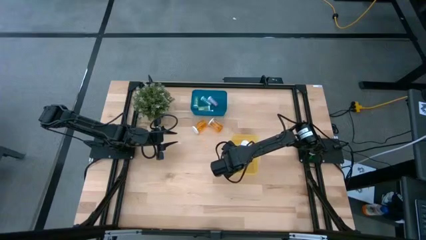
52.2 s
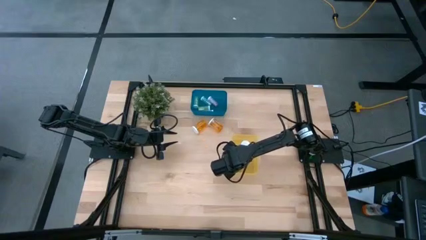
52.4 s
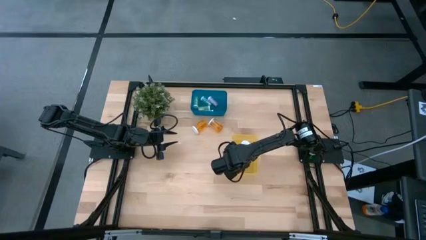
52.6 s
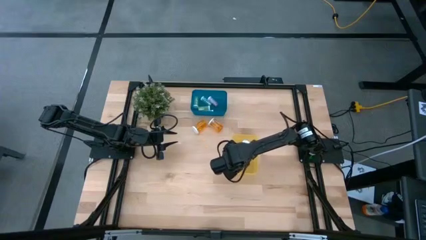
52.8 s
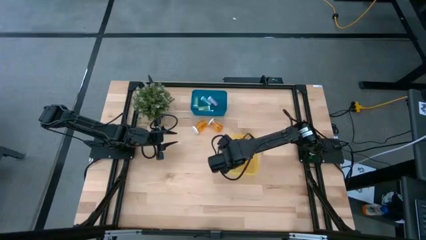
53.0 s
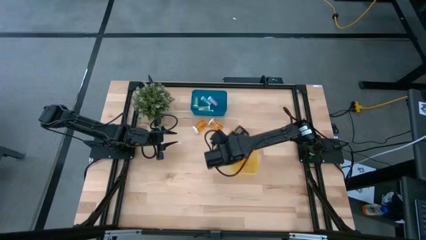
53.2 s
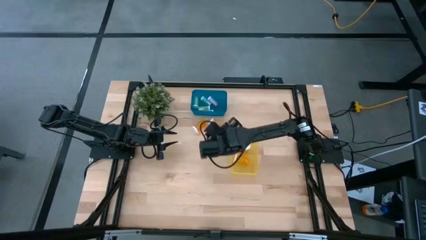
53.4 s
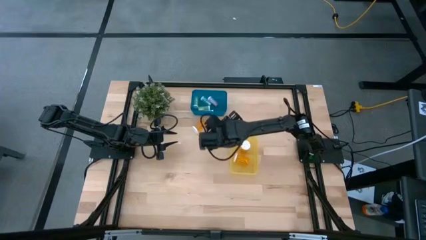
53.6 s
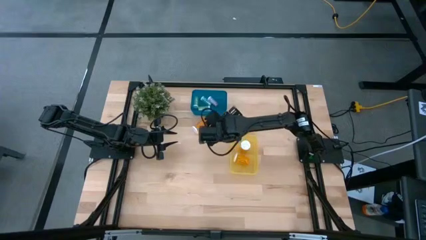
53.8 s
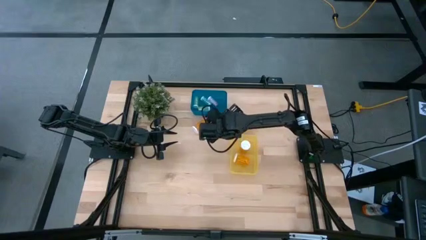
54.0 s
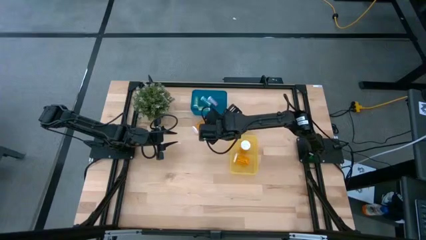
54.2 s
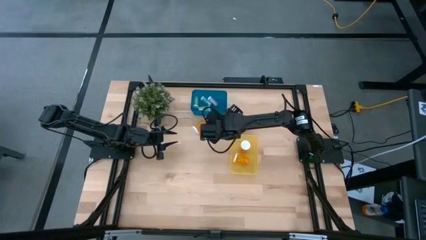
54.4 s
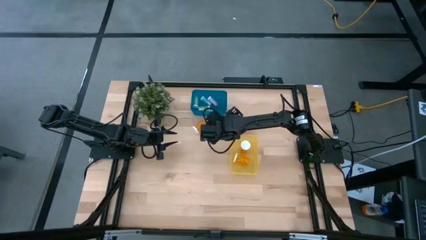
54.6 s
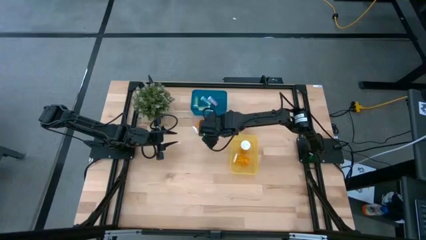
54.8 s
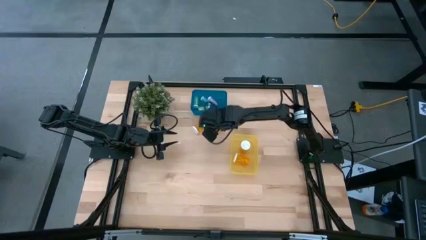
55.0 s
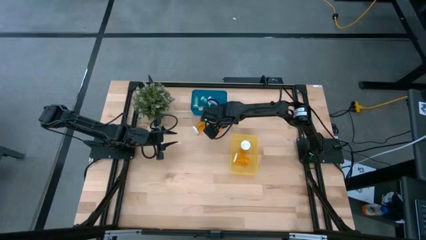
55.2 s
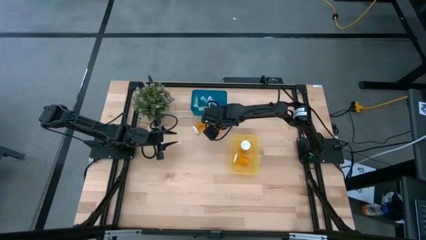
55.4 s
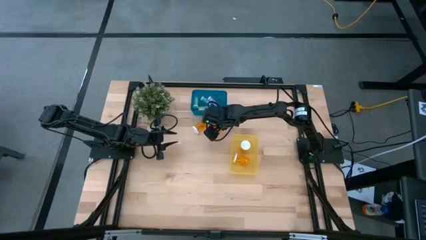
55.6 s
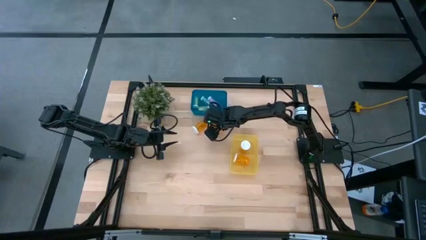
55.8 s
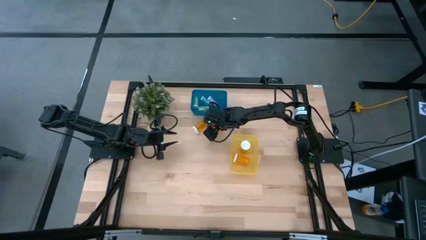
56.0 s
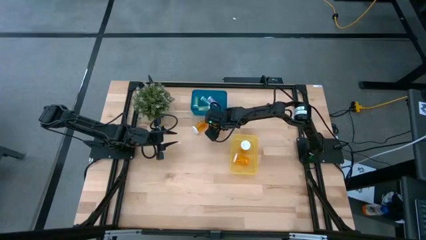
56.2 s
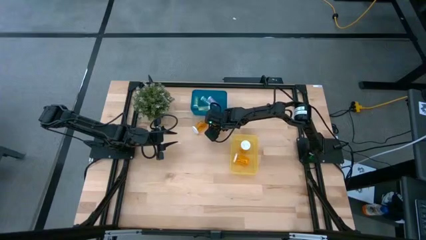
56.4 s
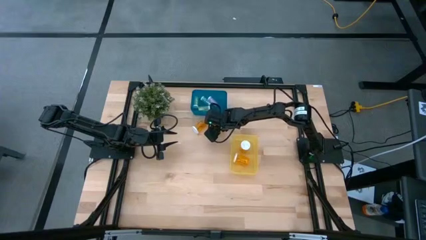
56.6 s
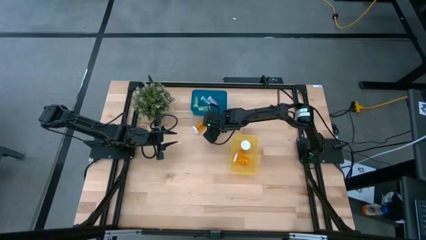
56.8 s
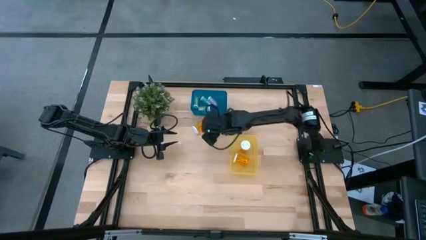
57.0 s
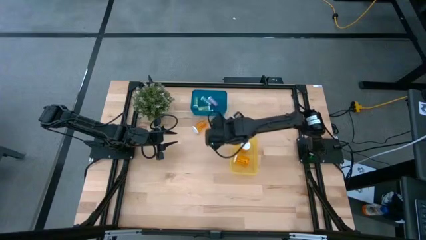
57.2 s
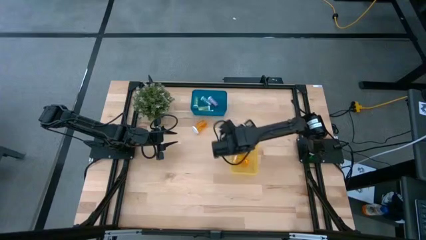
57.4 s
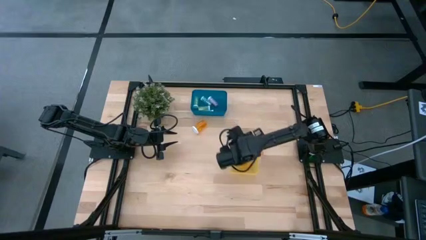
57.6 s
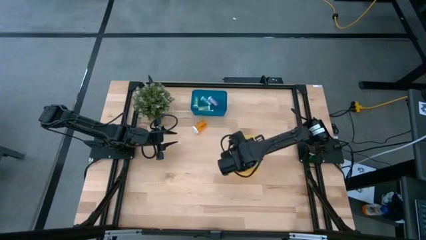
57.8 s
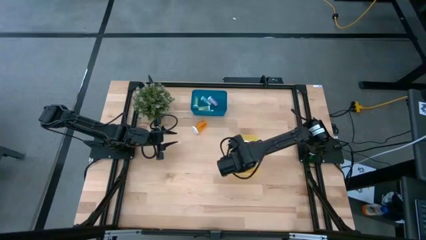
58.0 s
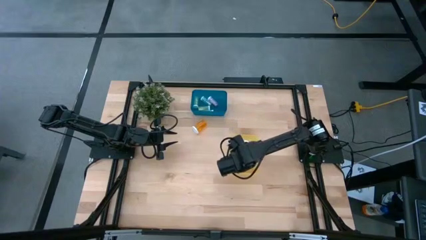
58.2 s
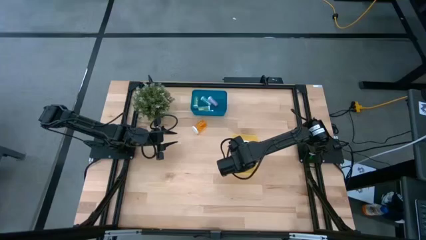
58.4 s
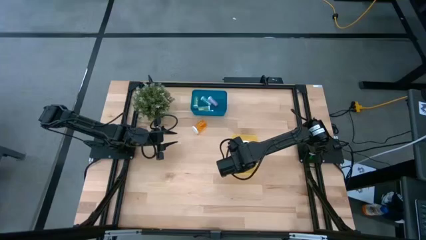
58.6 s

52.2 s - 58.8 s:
Task: Pick and place medicine bottles into bin by pill shape (circle, oval)
Put the right big orange pill bottle into the yellow bin

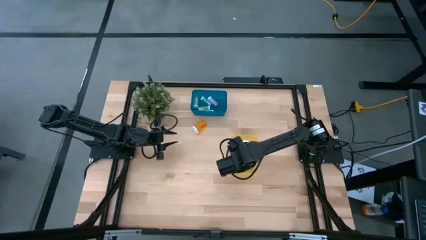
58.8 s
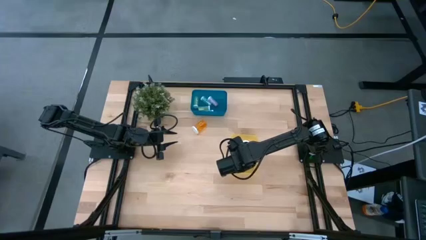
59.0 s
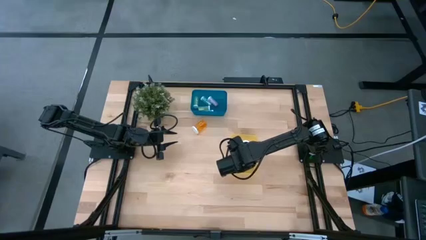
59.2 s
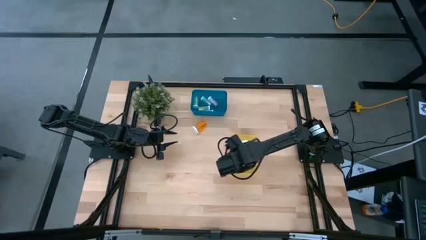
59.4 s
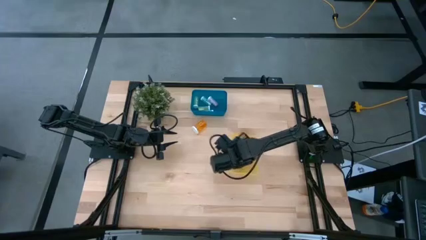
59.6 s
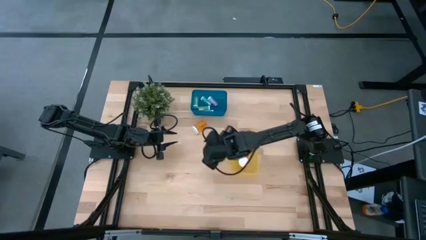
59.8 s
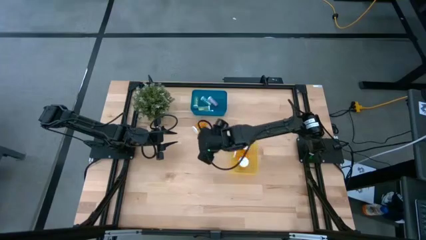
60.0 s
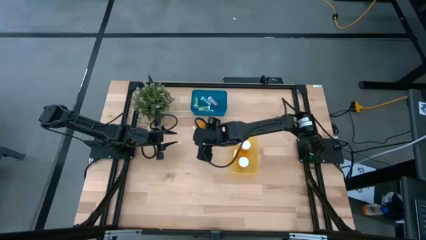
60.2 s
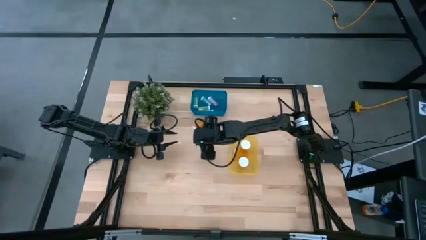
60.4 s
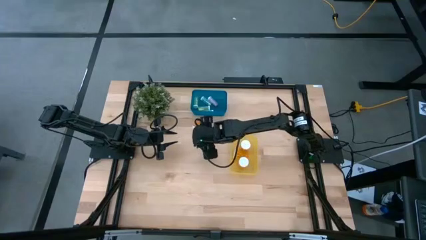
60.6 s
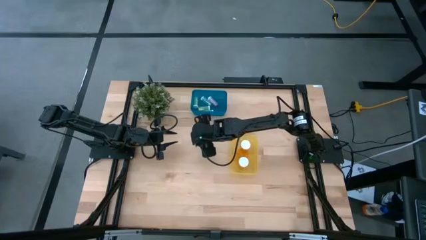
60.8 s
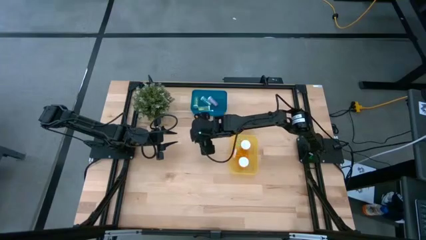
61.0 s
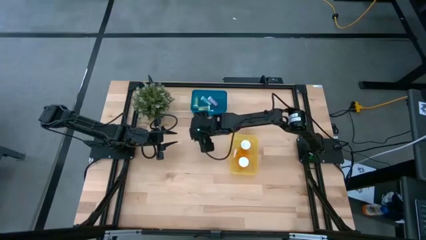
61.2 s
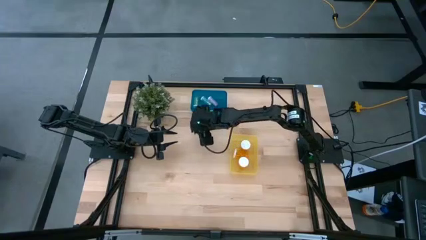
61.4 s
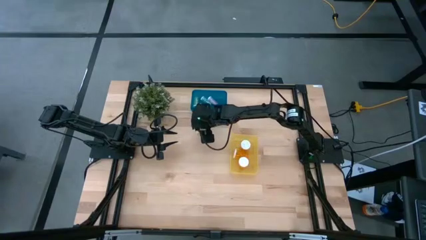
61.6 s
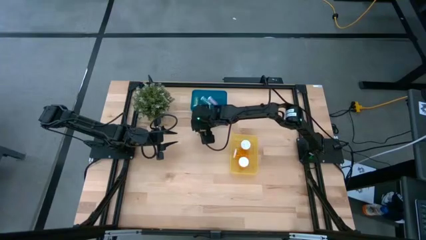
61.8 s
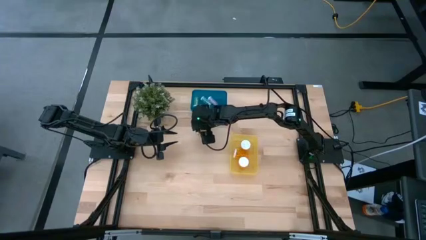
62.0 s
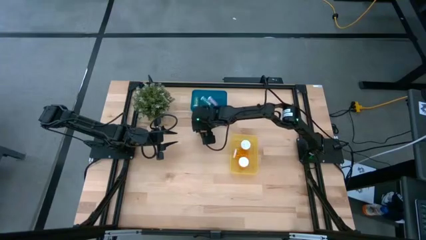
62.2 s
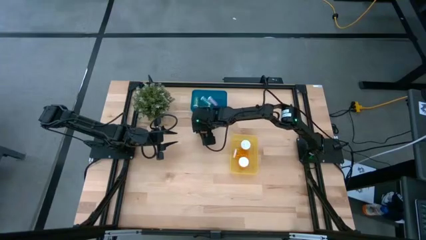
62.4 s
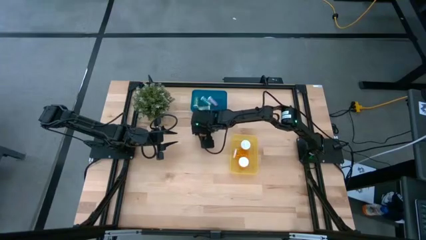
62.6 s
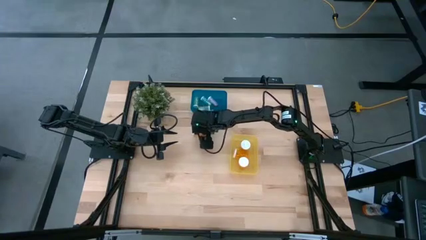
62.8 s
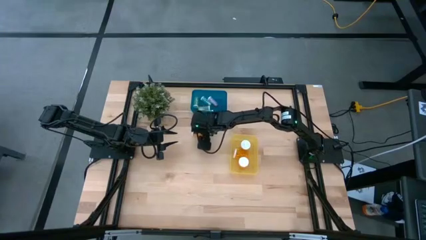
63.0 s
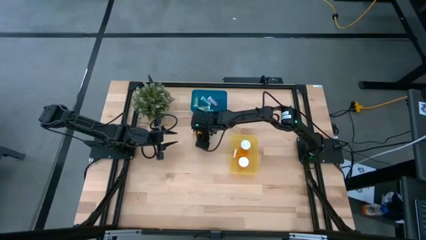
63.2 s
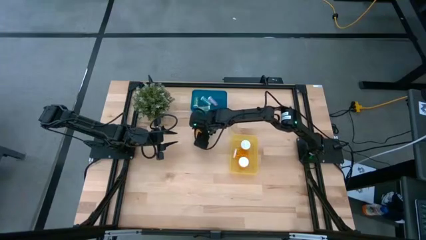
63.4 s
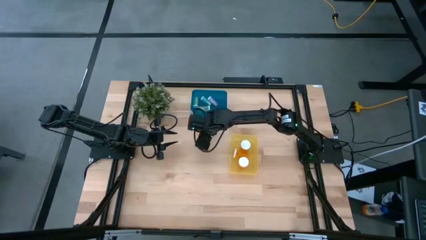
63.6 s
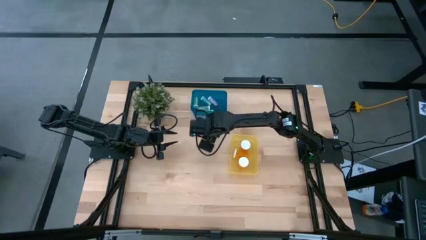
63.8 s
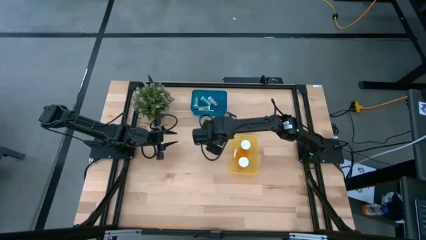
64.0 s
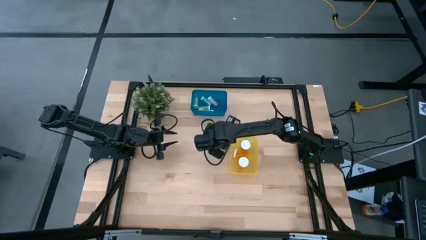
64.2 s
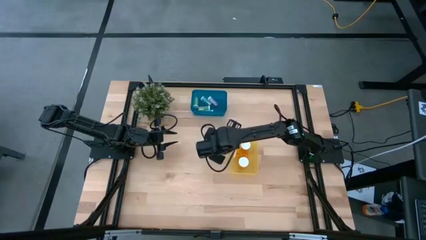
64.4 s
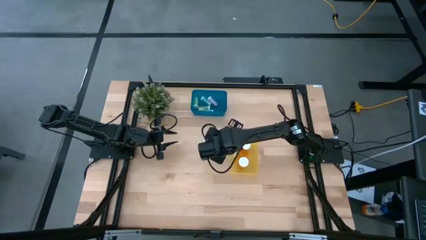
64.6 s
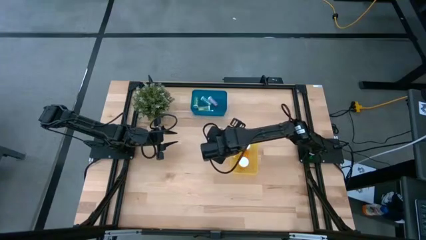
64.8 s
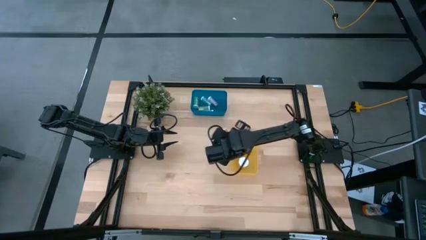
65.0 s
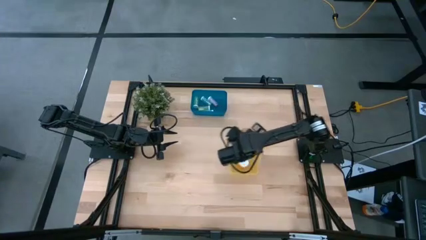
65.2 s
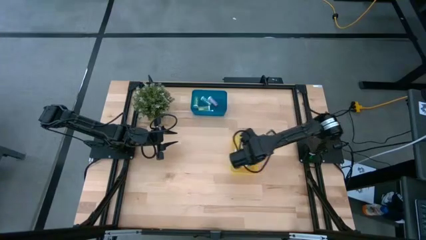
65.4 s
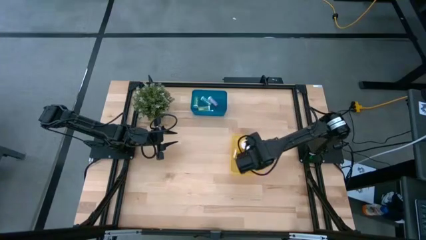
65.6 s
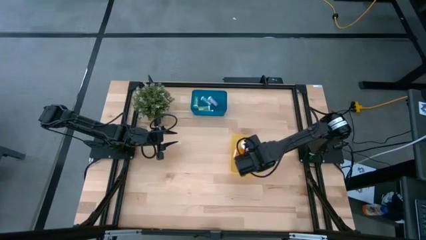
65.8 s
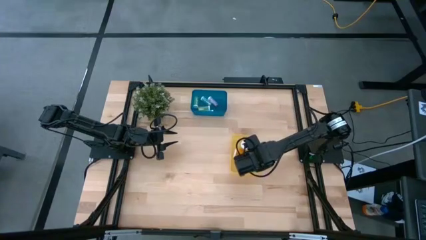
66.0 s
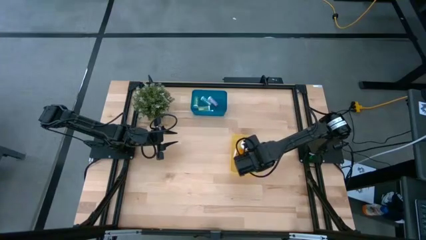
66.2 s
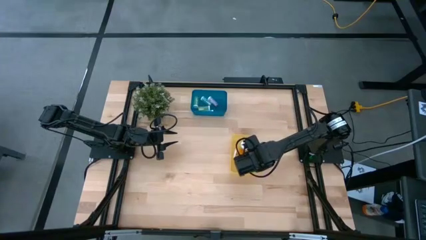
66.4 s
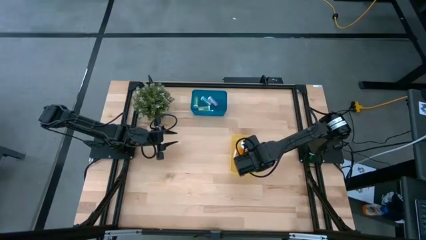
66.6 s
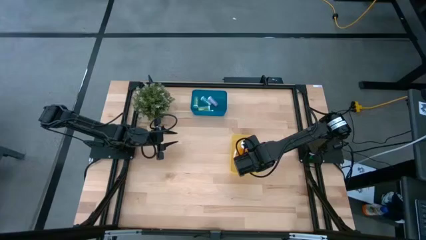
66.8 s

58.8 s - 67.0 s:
Put the big orange pill bottle into the yellow bin

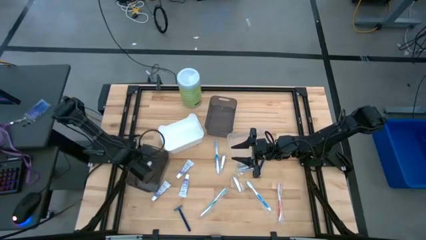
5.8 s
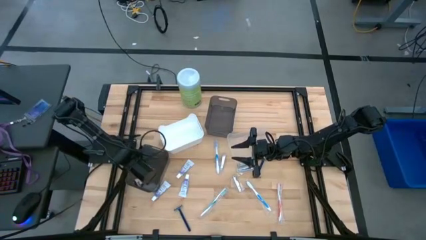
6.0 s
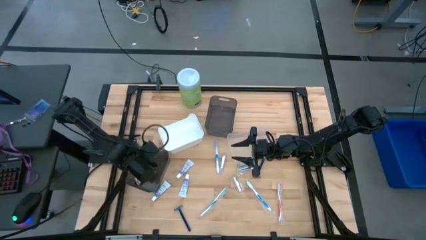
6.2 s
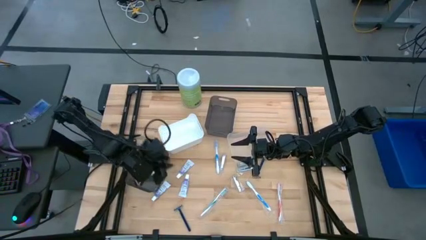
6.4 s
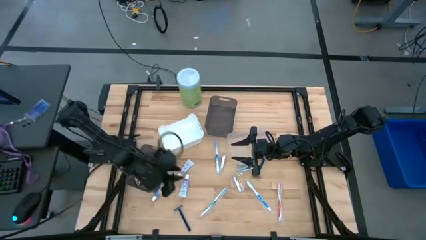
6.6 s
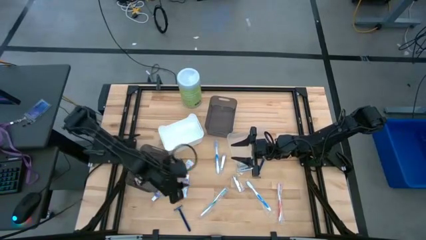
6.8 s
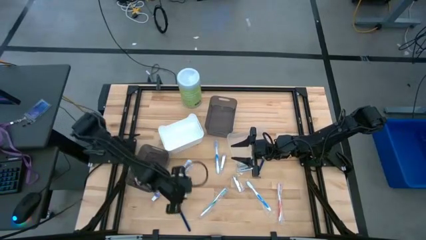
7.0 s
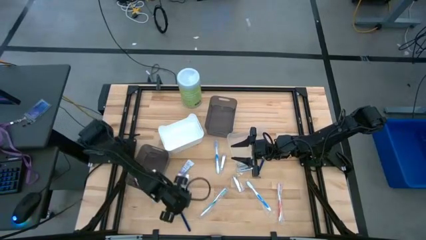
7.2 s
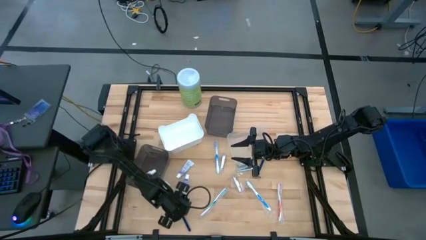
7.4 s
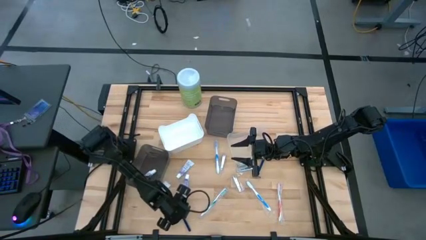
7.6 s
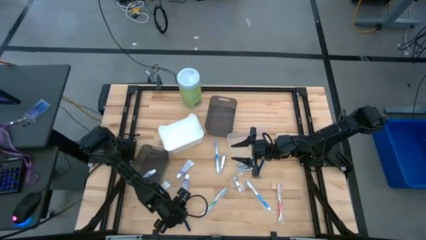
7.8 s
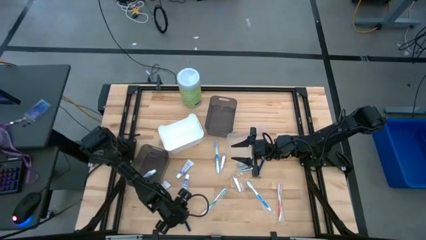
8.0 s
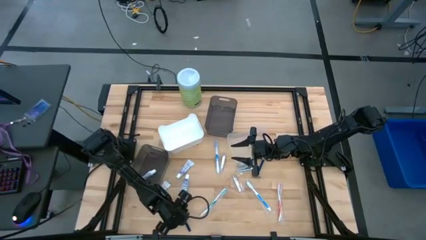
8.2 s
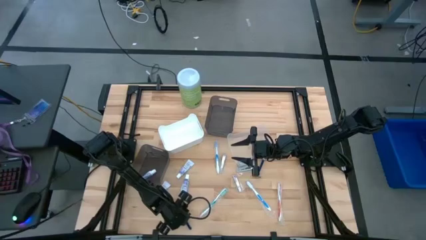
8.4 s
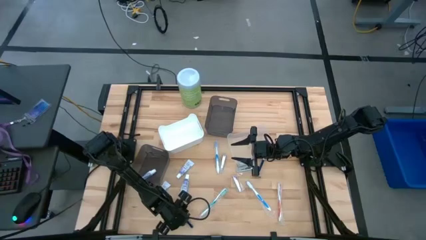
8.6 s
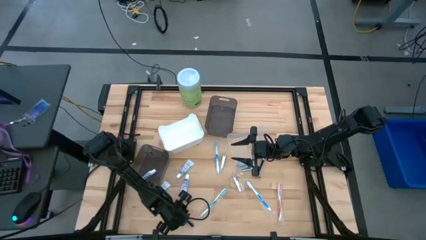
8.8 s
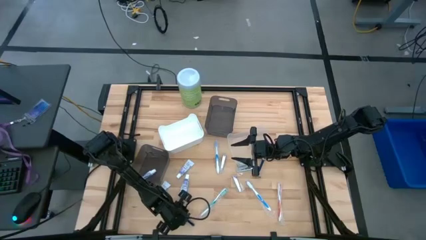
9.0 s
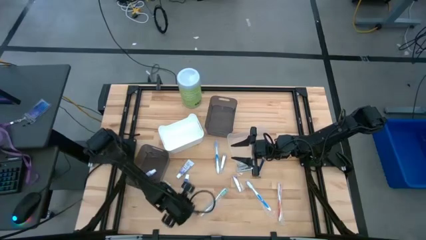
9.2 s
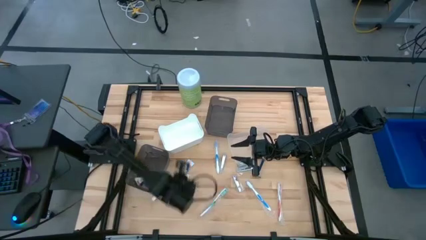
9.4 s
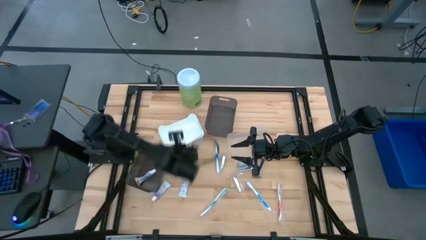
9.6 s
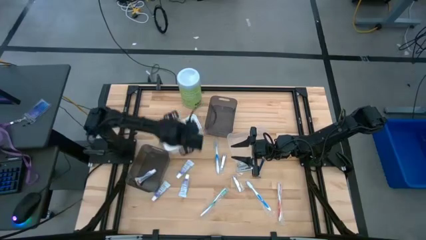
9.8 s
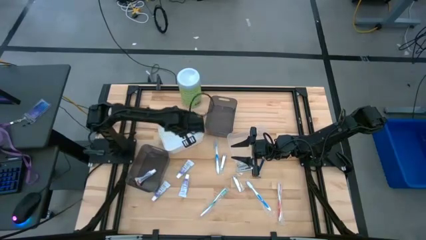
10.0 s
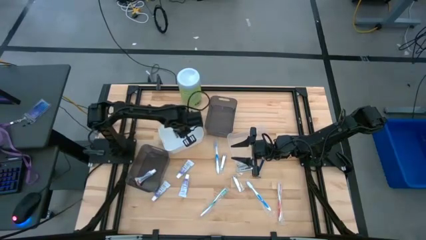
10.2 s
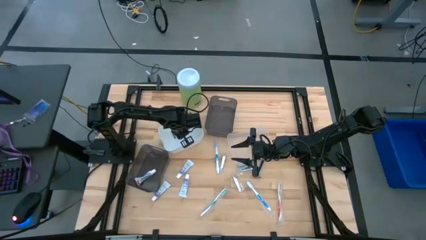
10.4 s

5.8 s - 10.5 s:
Task: Pick & Place Travel size toiletries
Put the blue razor into the white bin
